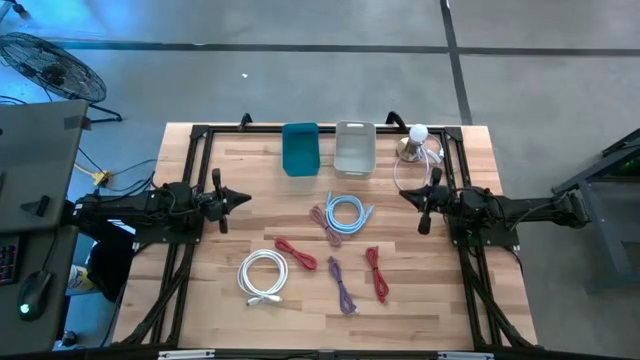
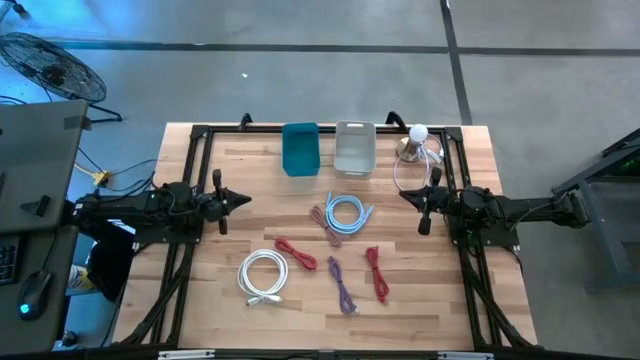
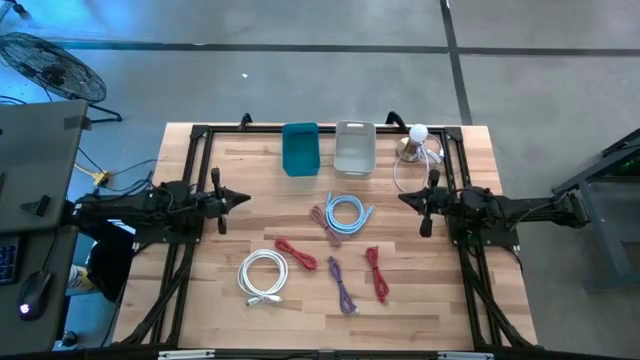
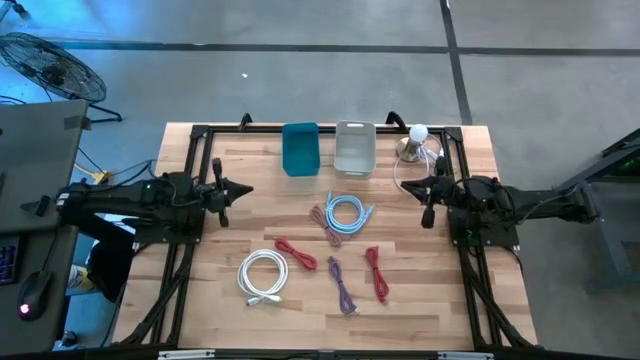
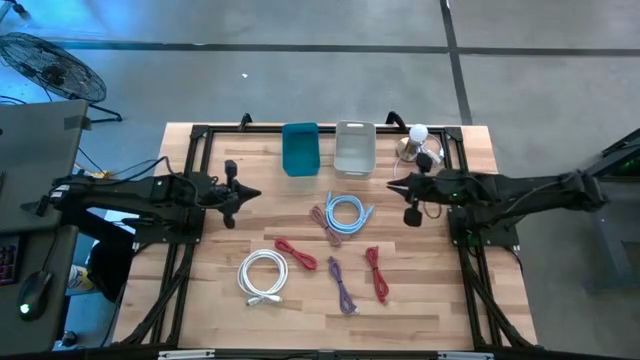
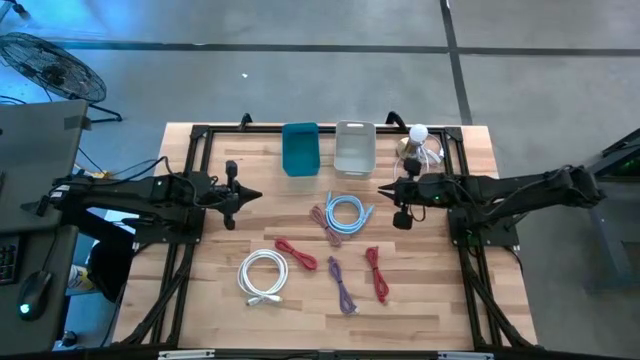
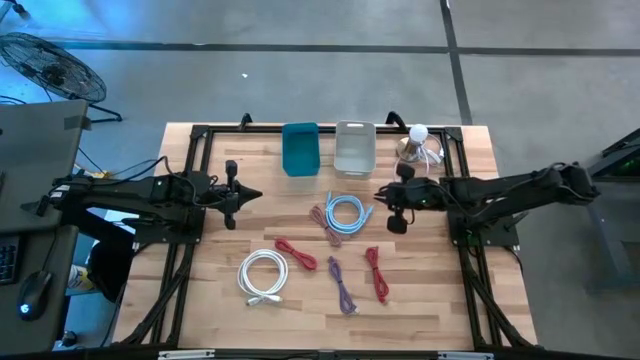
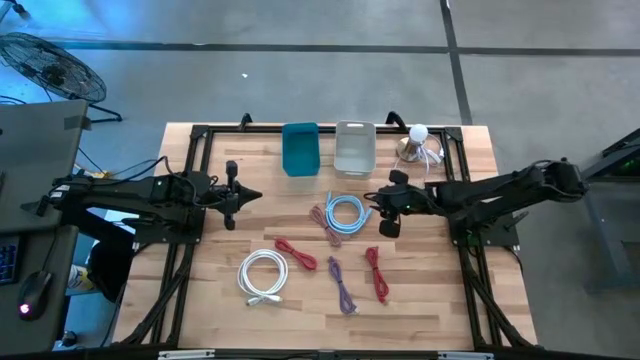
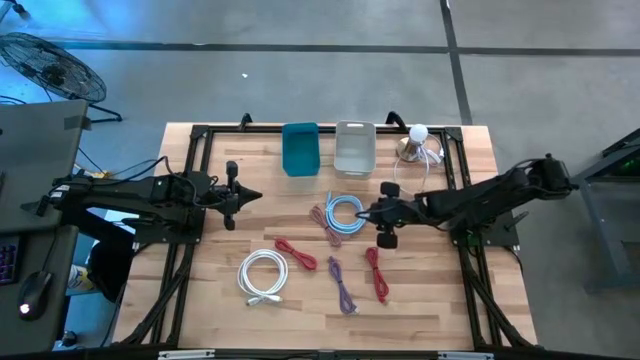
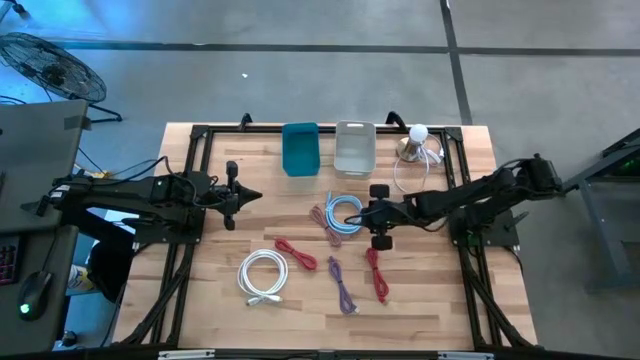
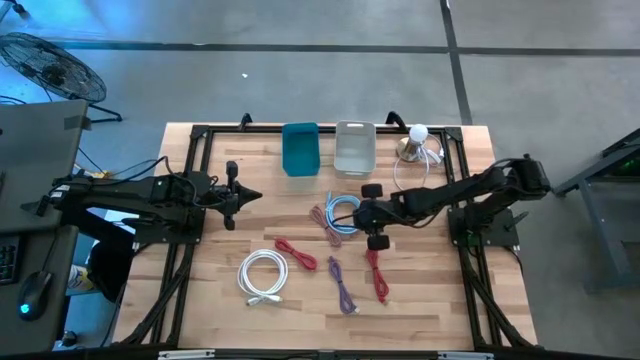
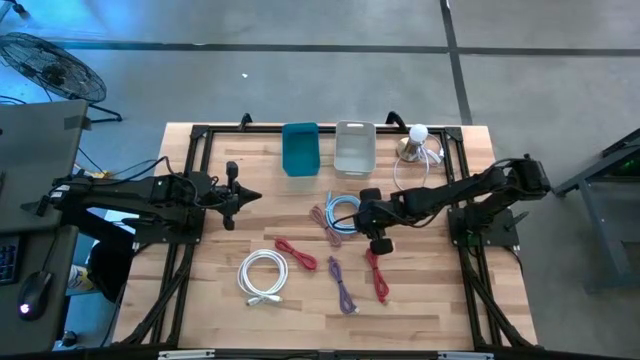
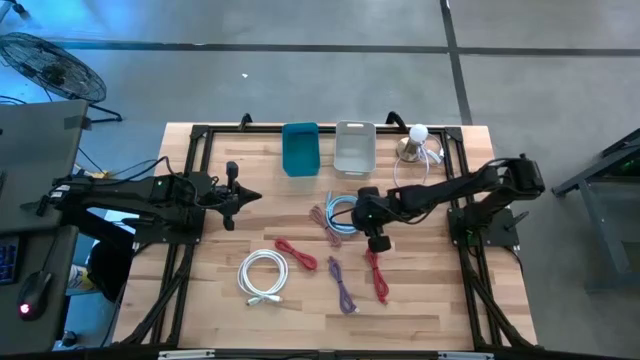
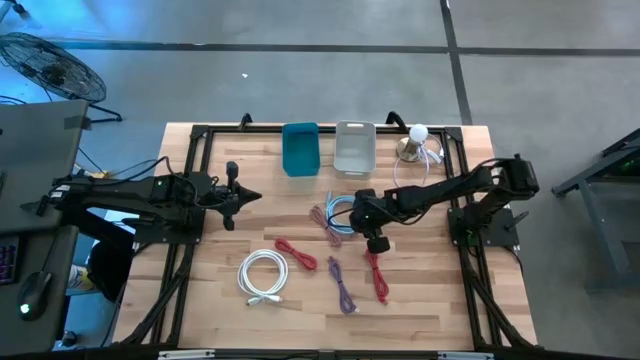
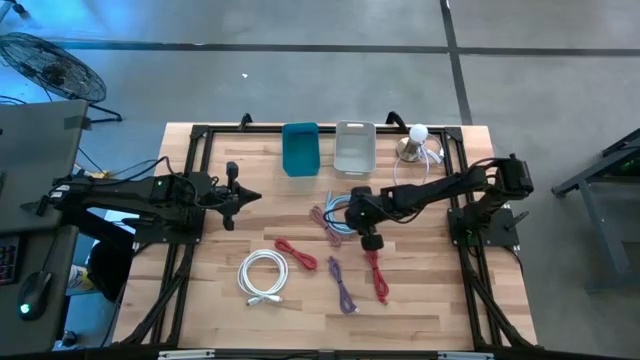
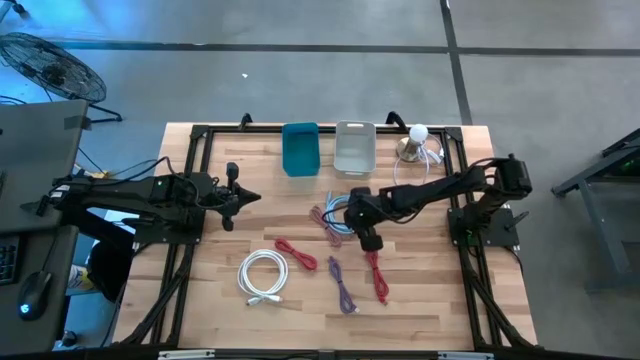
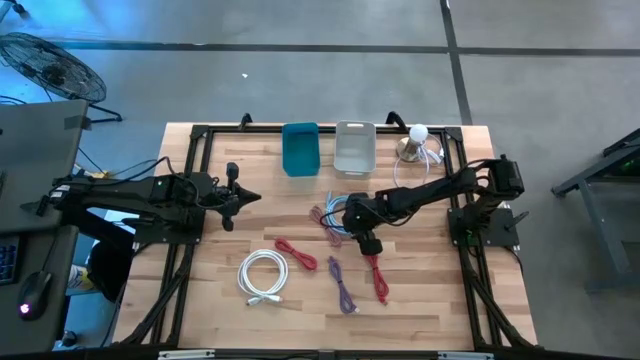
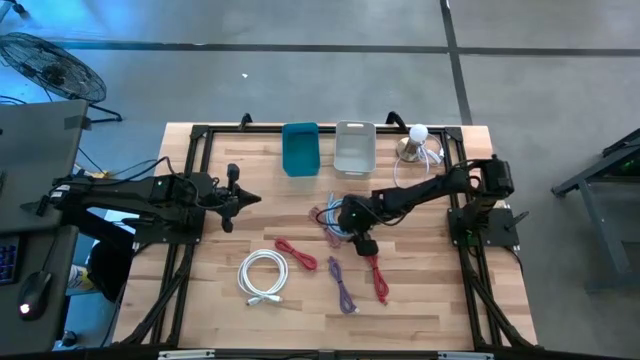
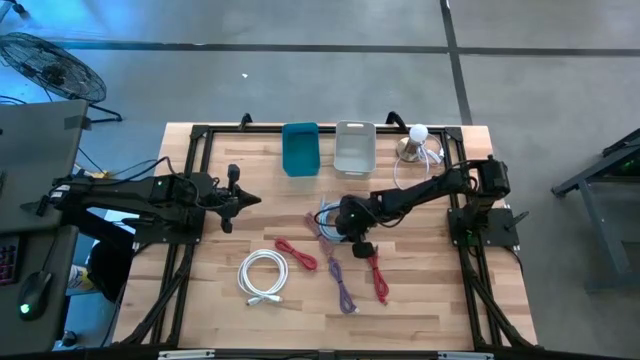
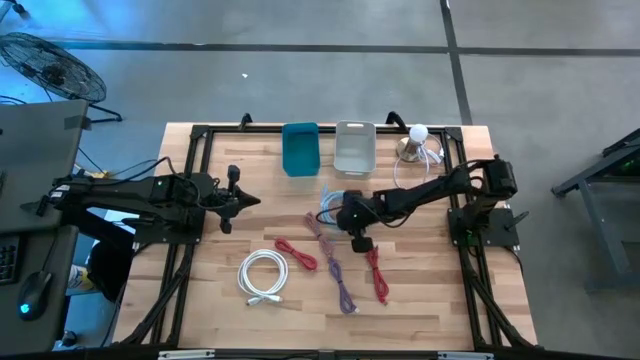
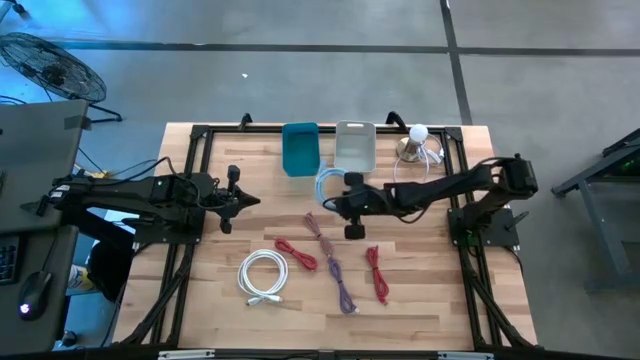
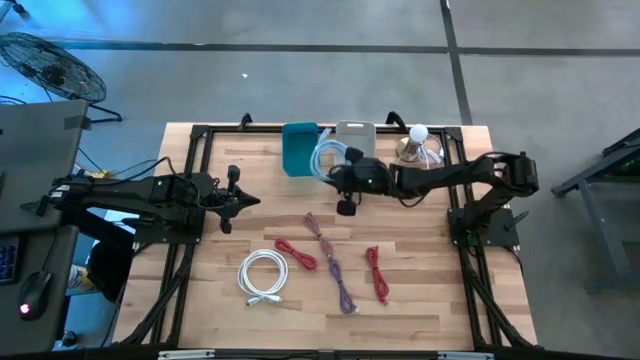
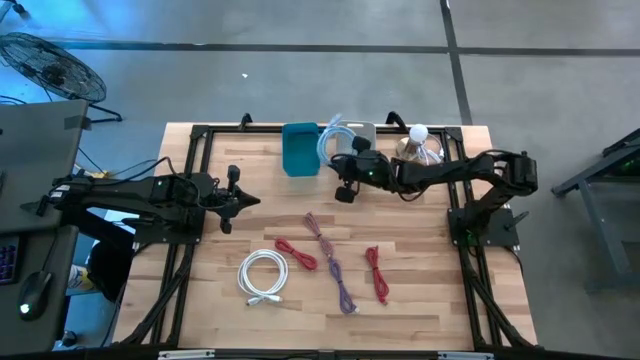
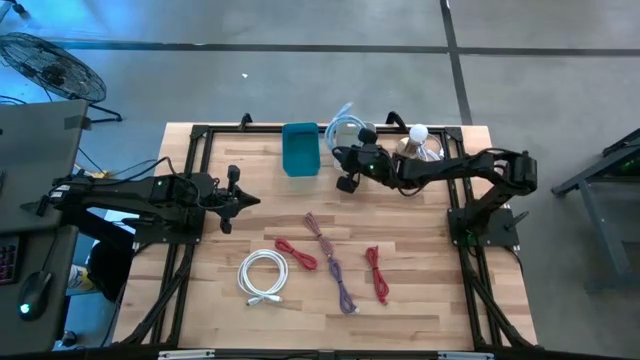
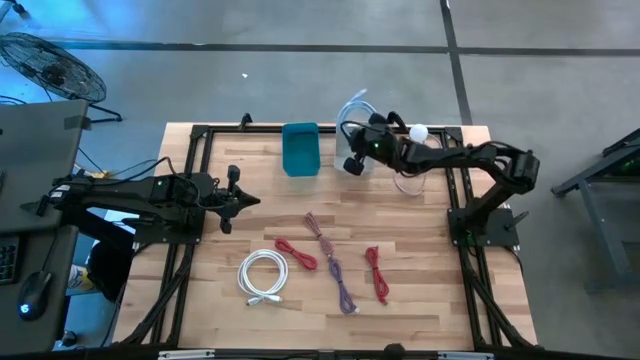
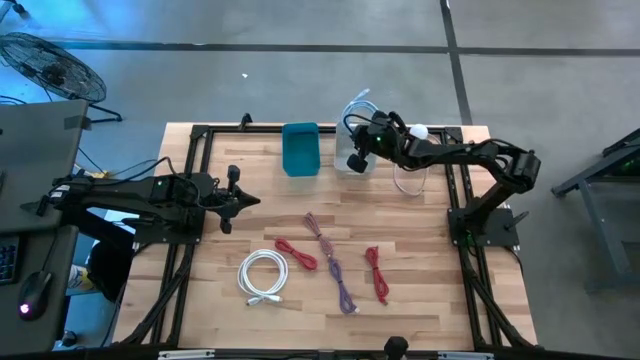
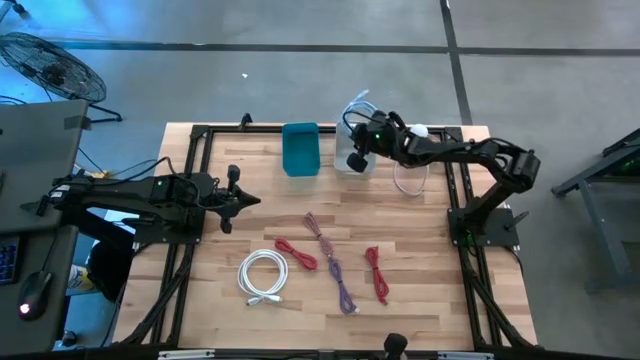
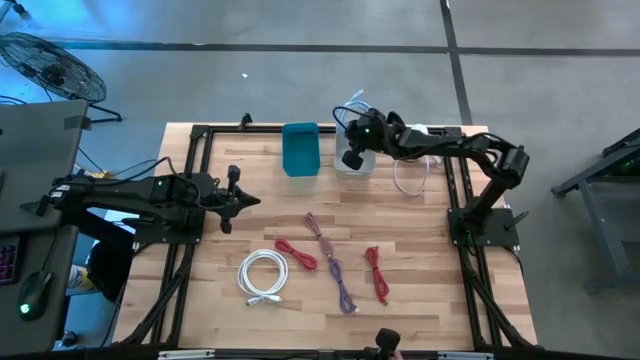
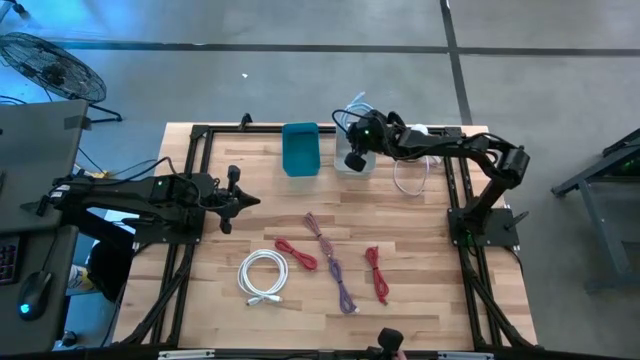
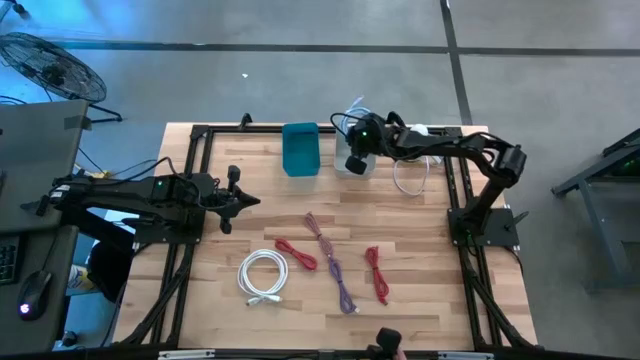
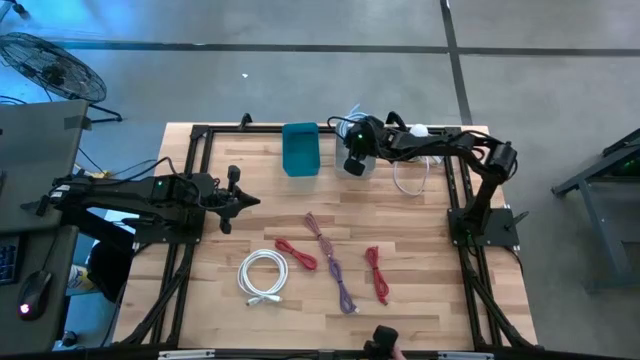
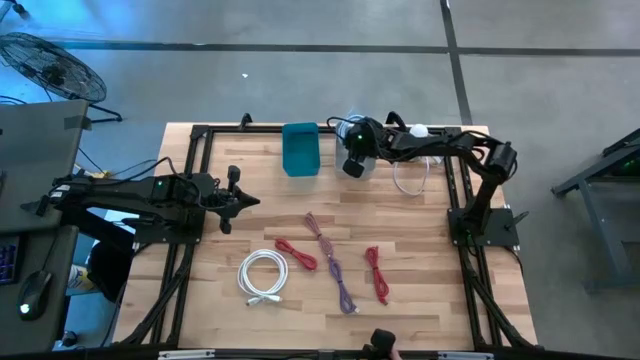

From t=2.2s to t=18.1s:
Task: Pick & Place USB Port
Put the blue HDMI cable into the gray bin

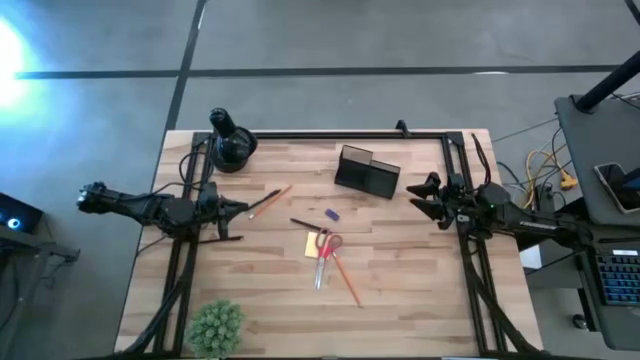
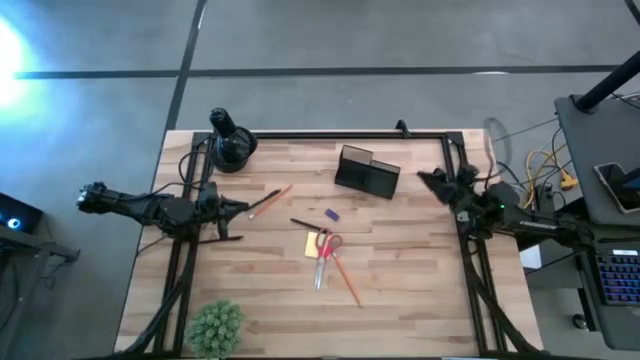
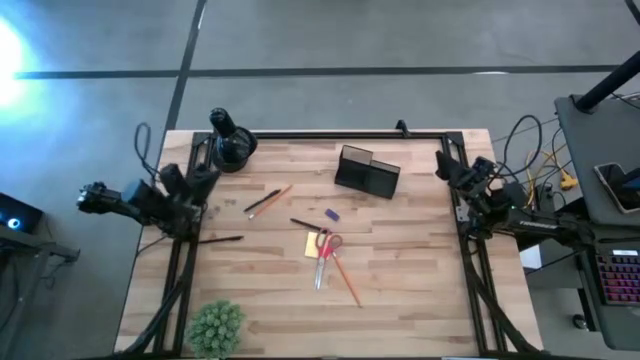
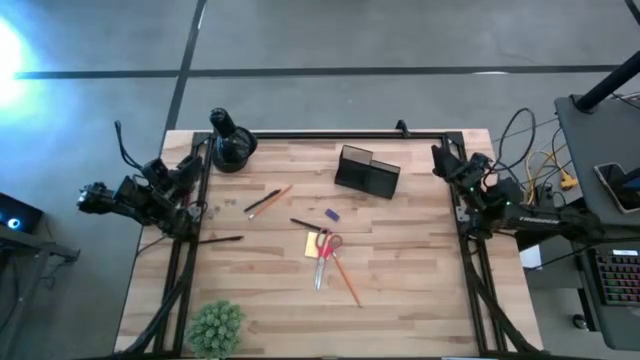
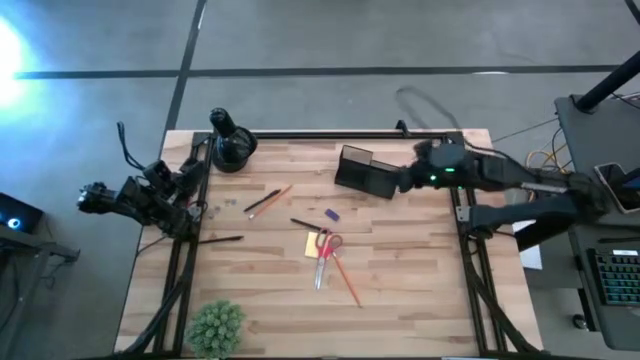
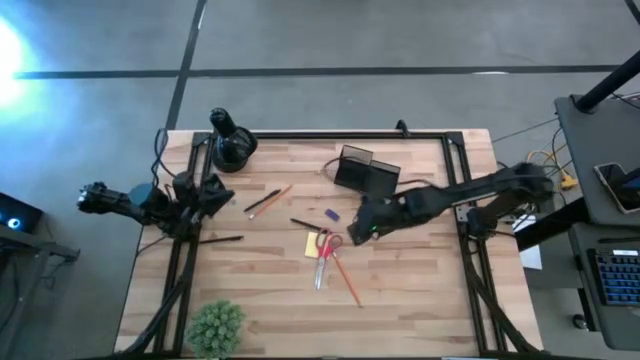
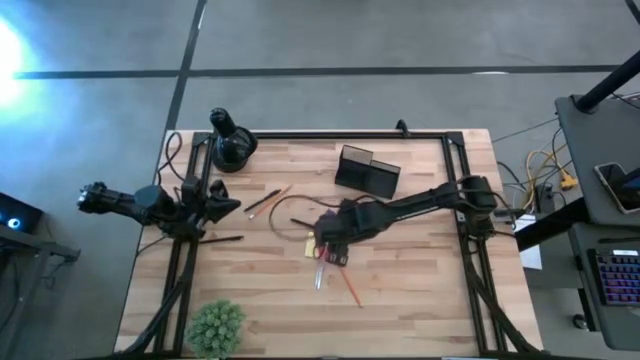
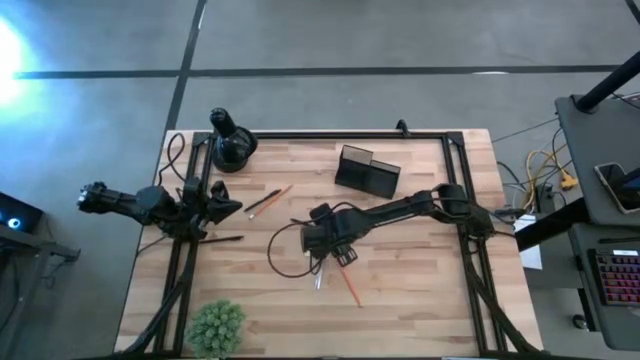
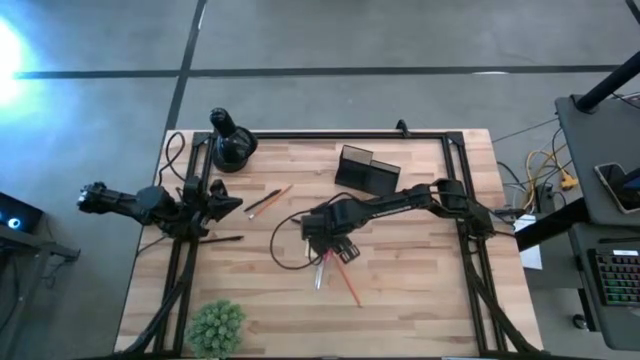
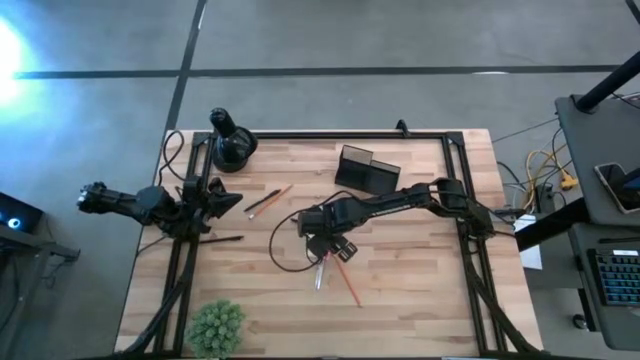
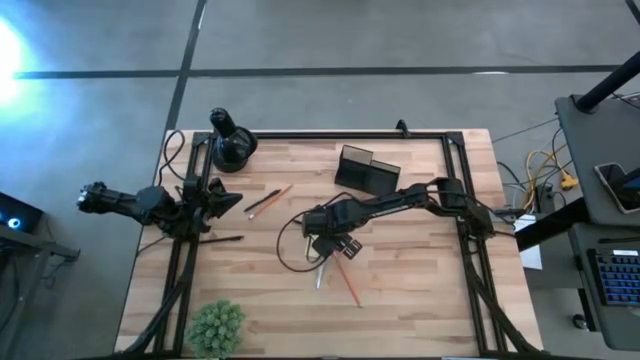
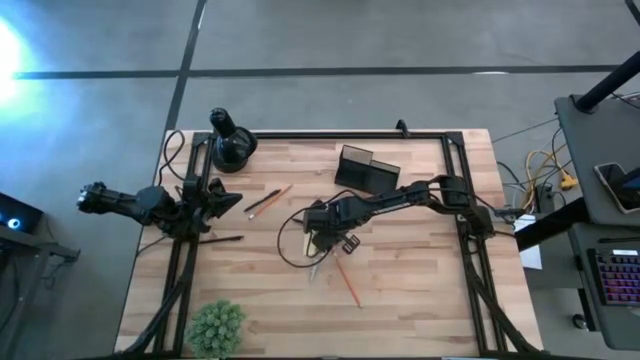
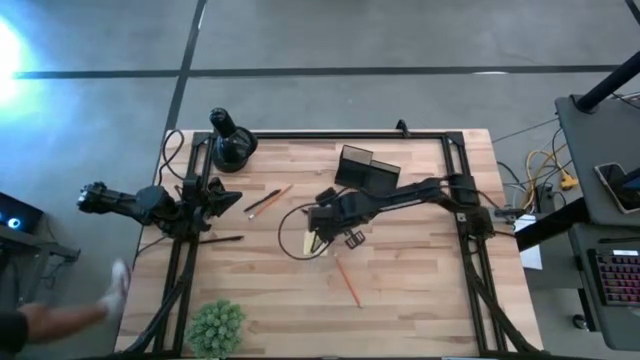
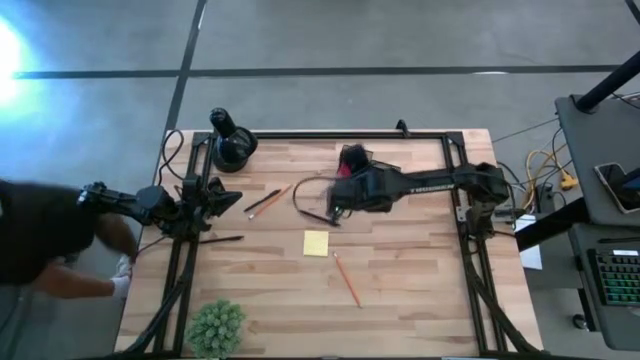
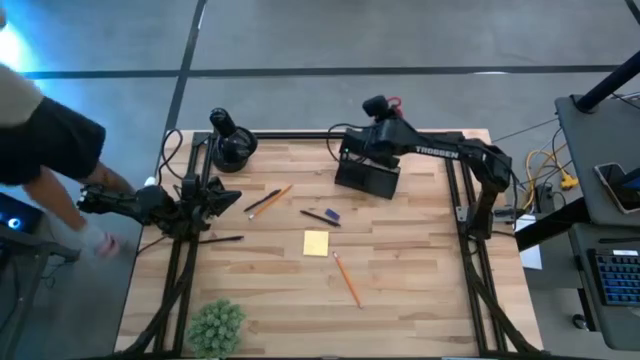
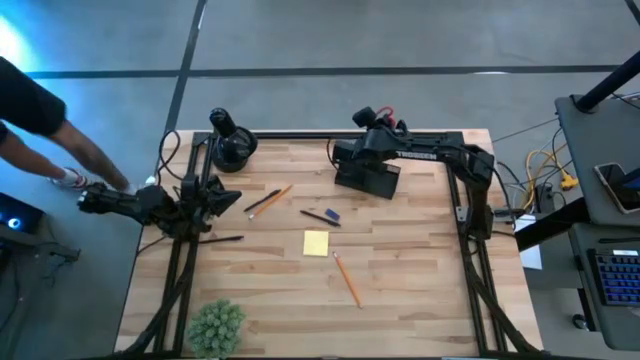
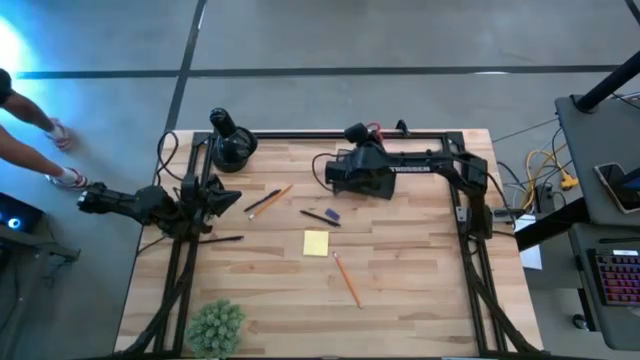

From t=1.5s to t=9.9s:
Task: Pick and place office supplies into organizer
Put the scissors into the desk organizer
